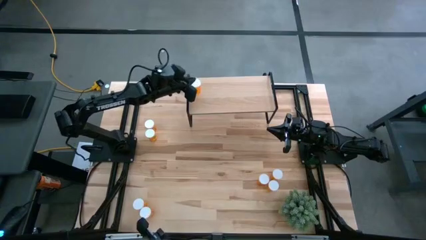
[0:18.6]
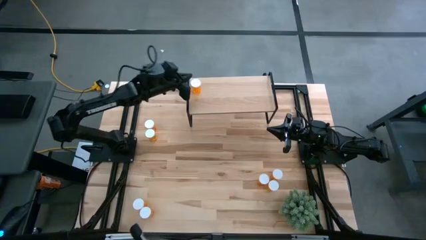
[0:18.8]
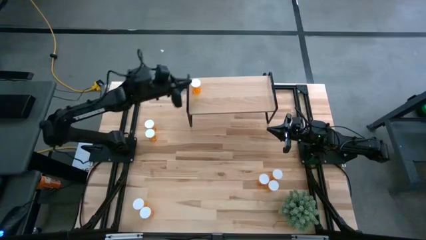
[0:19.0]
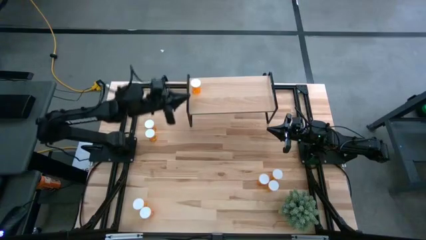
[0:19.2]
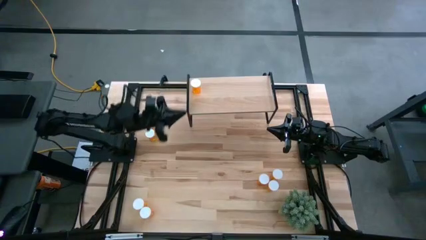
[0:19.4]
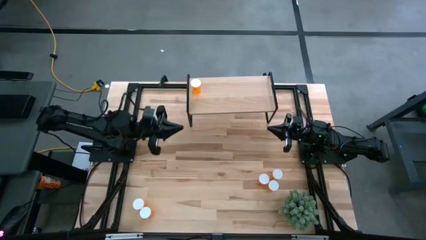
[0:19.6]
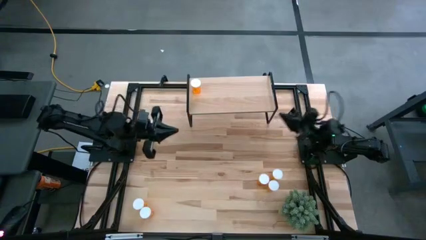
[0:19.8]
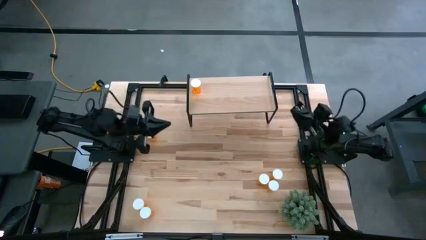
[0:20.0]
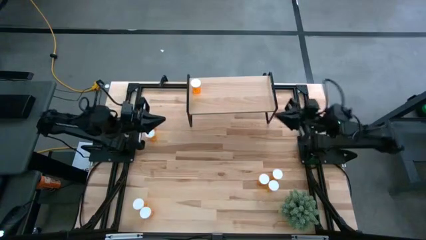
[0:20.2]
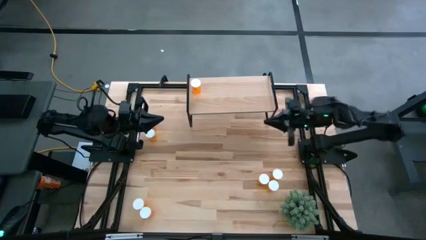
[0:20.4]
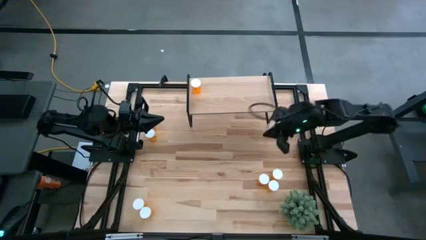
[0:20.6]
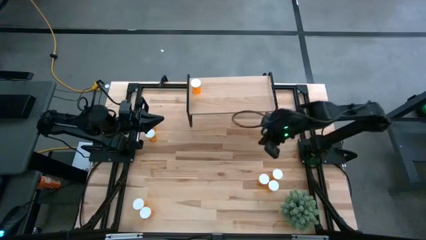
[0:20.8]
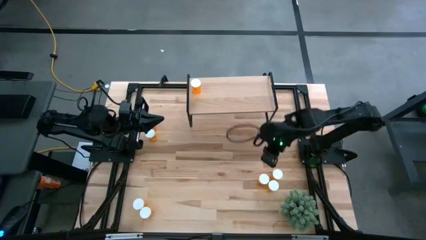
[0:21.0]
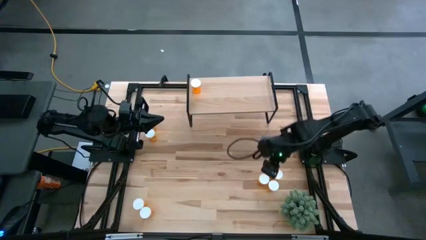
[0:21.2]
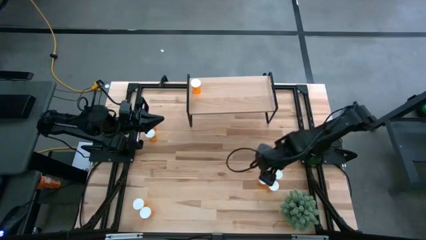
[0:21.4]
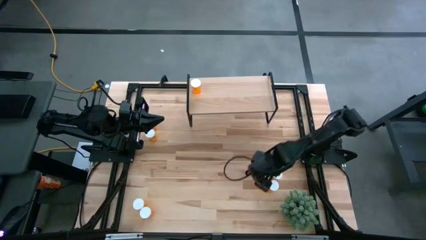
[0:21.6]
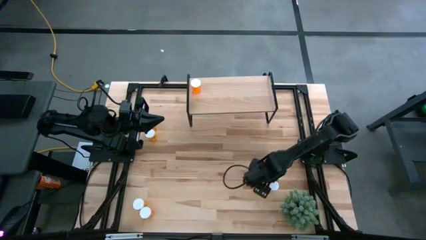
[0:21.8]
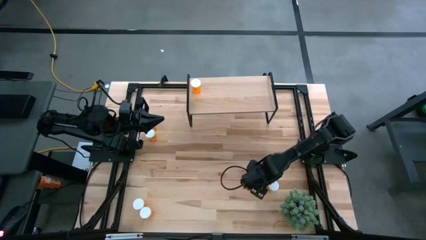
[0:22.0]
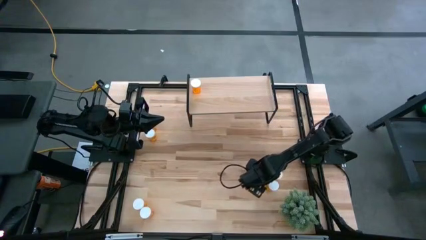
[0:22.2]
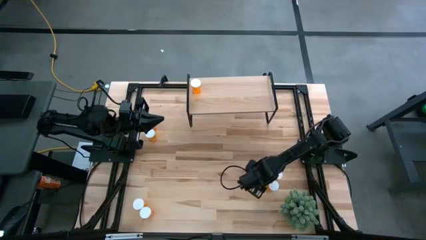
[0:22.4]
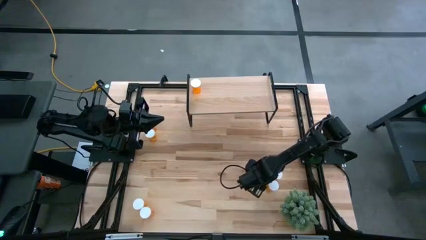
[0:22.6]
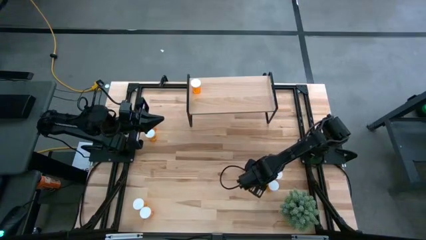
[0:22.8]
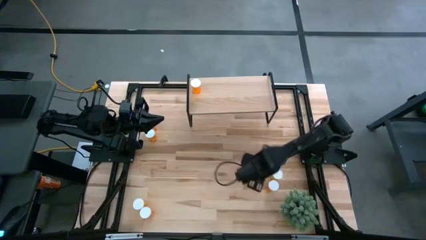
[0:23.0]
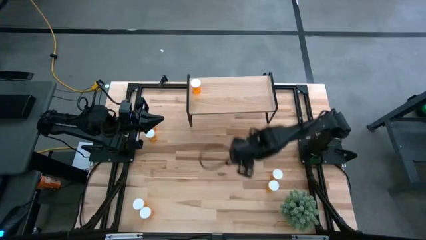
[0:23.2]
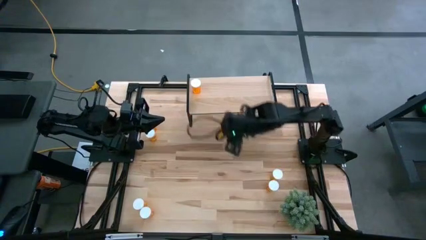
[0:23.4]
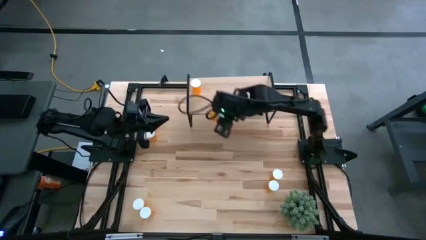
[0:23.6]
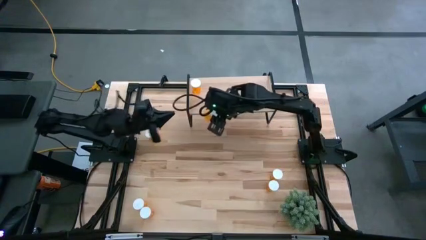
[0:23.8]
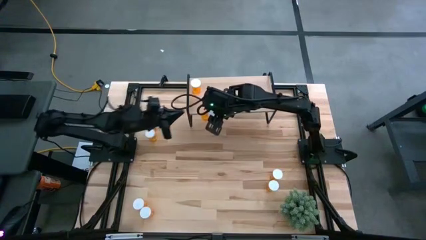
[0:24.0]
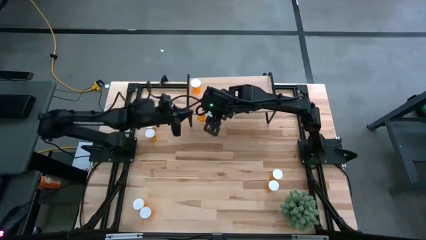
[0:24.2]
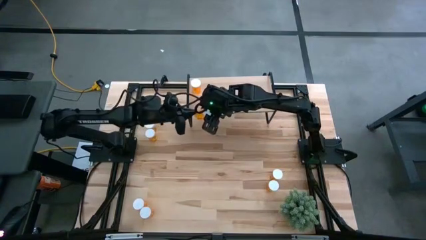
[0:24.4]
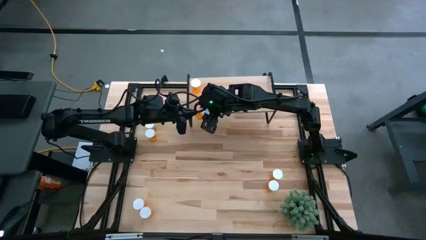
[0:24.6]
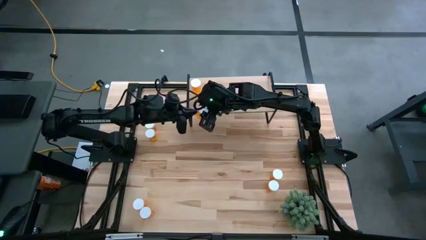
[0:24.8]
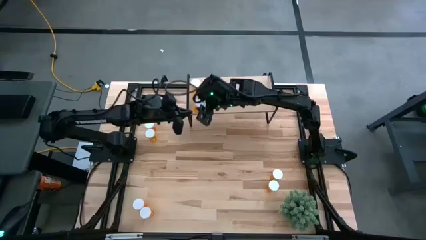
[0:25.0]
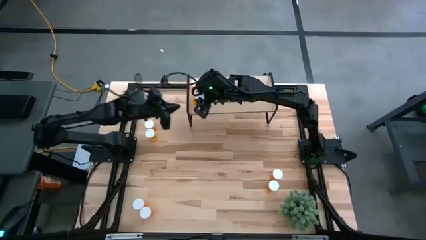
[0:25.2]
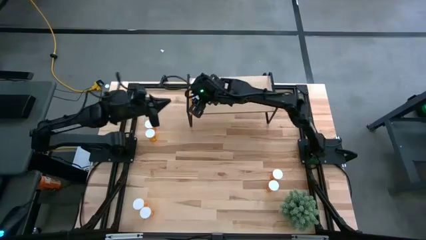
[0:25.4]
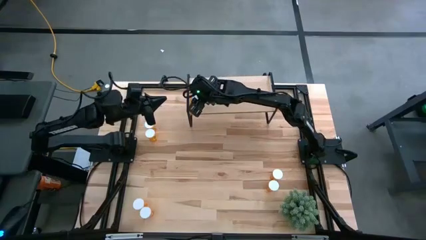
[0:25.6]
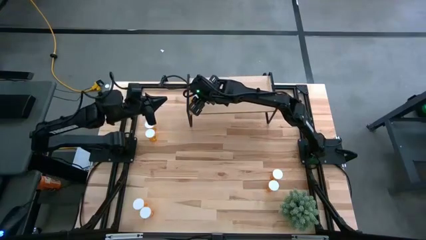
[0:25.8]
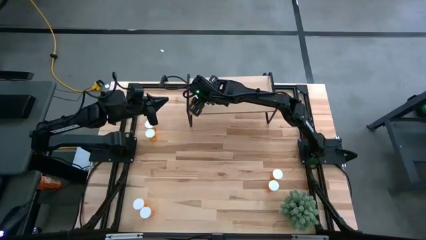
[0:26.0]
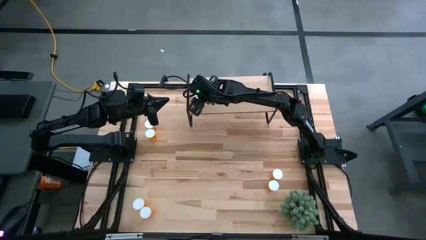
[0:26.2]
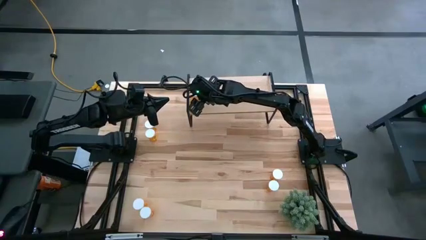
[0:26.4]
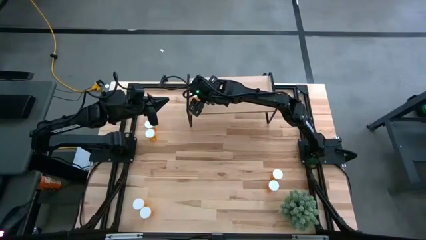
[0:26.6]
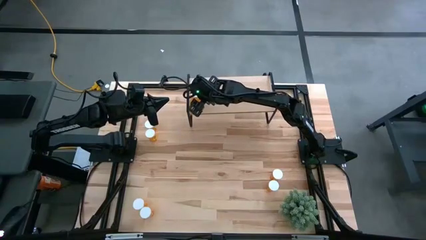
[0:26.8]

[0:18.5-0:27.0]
Task: Pick and place medicine bottles onto shelf by color
Put the orange pill bottle on the shelf aligned with the other orange pill bottle

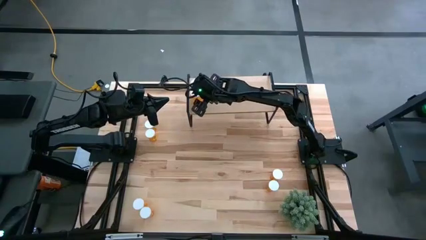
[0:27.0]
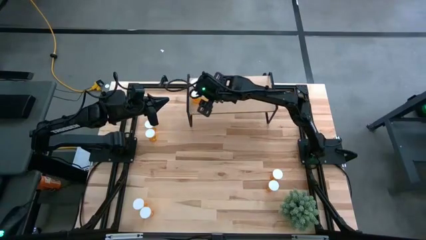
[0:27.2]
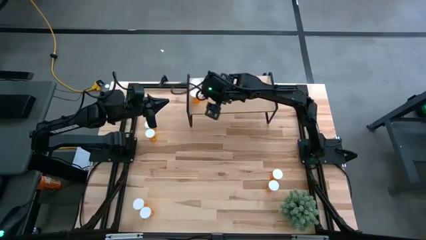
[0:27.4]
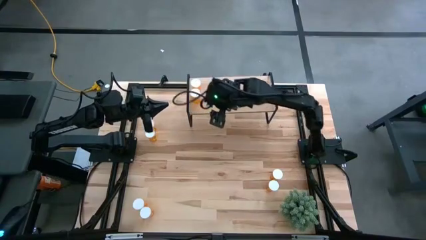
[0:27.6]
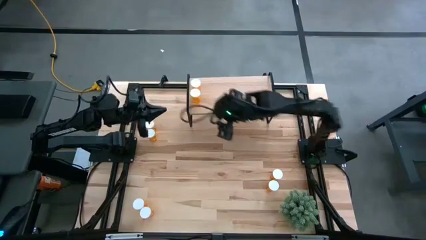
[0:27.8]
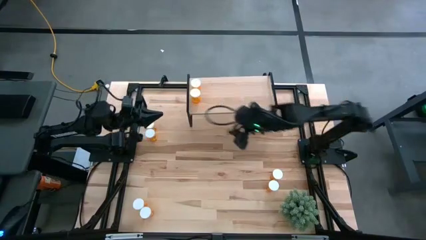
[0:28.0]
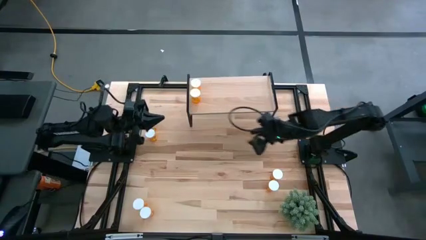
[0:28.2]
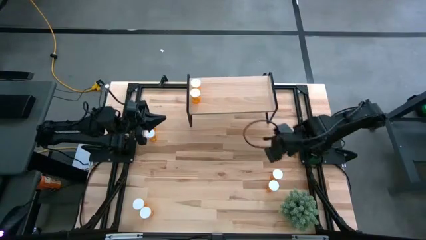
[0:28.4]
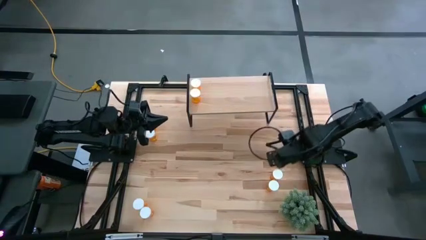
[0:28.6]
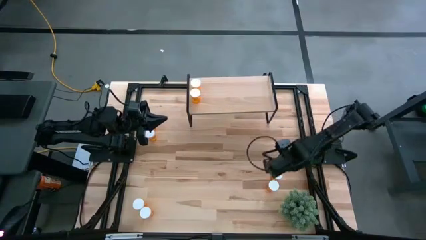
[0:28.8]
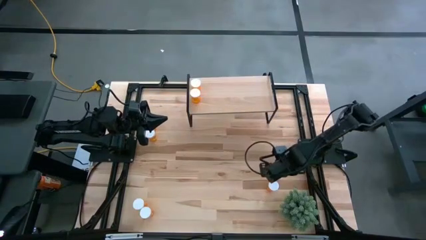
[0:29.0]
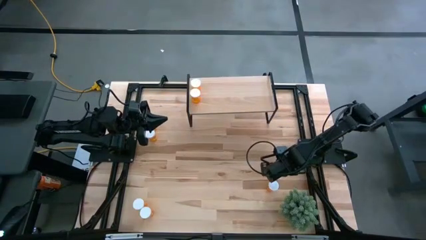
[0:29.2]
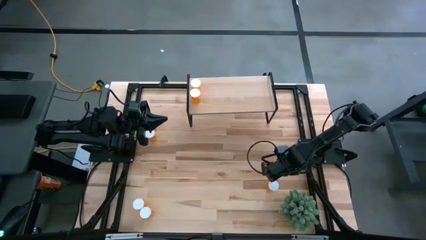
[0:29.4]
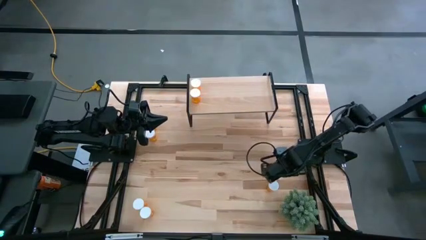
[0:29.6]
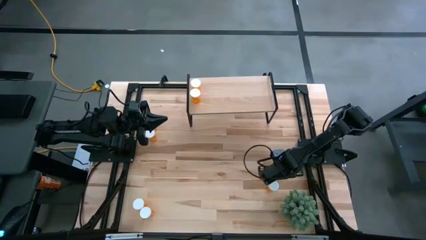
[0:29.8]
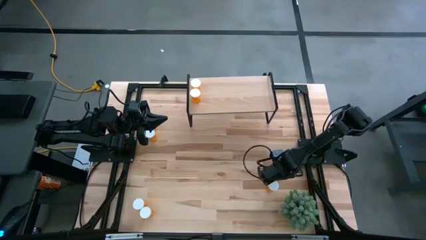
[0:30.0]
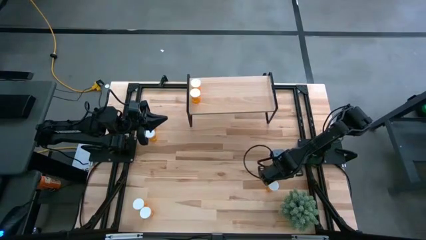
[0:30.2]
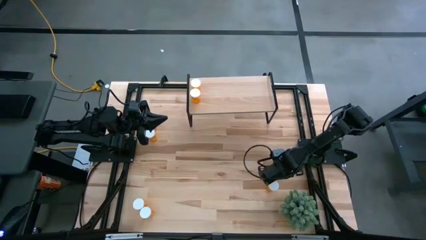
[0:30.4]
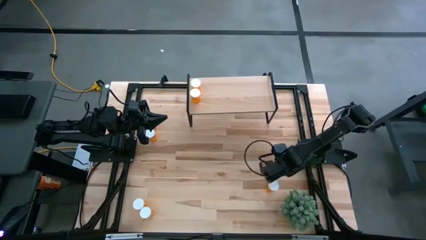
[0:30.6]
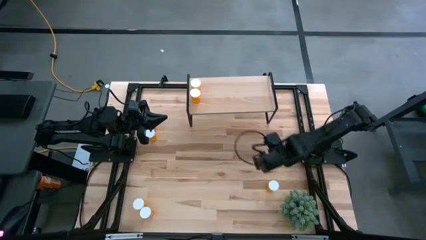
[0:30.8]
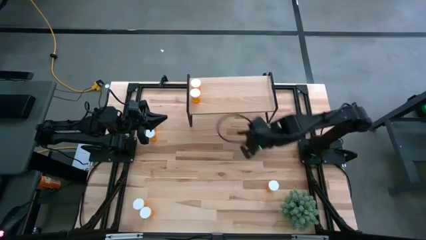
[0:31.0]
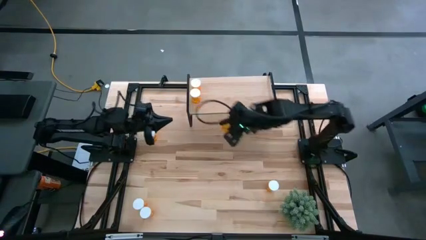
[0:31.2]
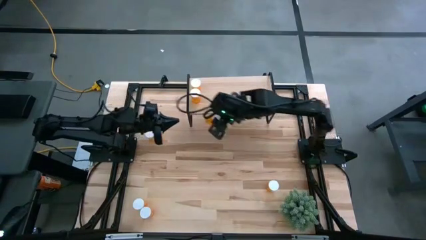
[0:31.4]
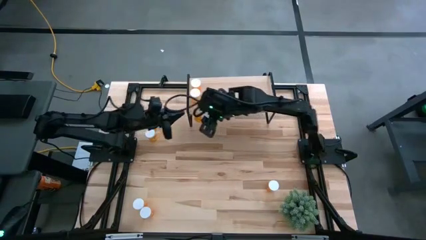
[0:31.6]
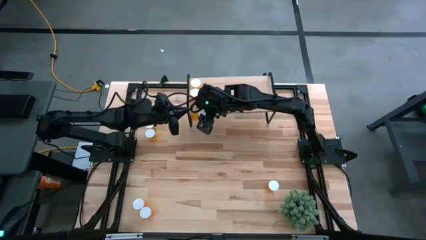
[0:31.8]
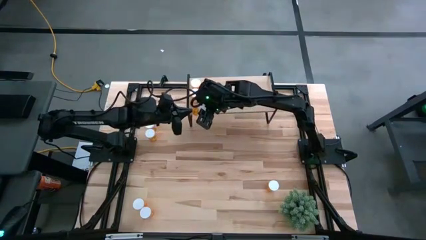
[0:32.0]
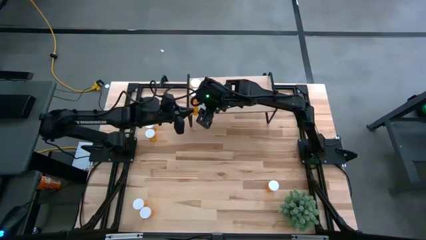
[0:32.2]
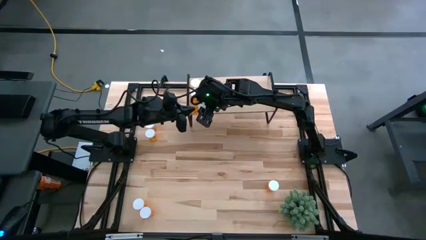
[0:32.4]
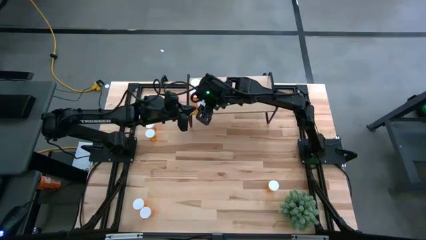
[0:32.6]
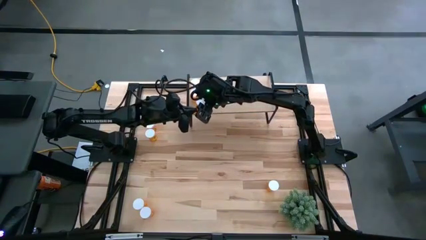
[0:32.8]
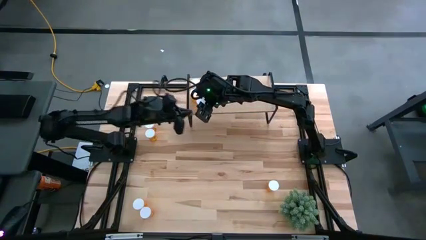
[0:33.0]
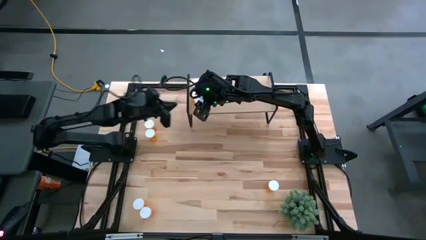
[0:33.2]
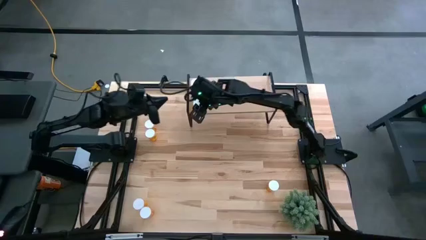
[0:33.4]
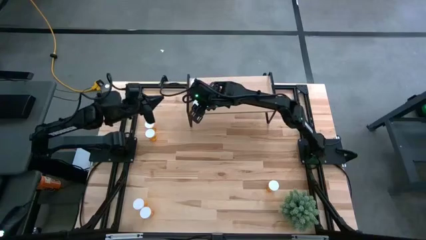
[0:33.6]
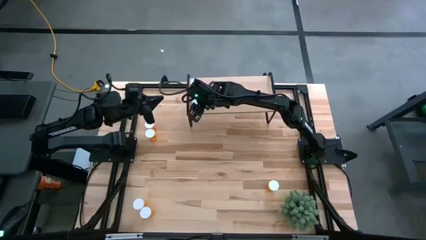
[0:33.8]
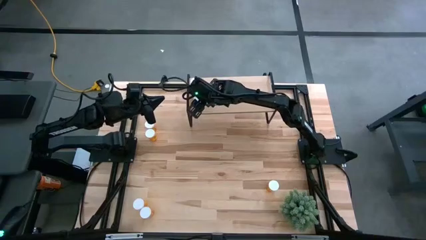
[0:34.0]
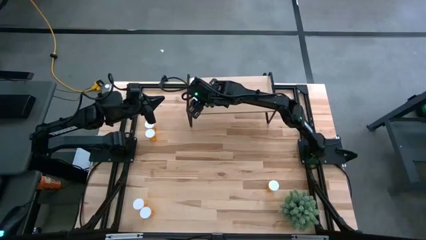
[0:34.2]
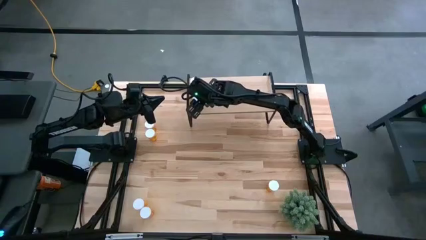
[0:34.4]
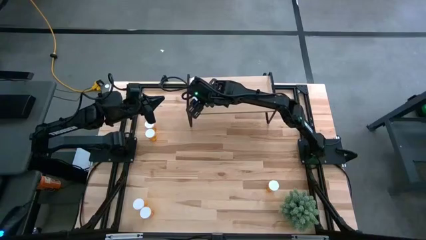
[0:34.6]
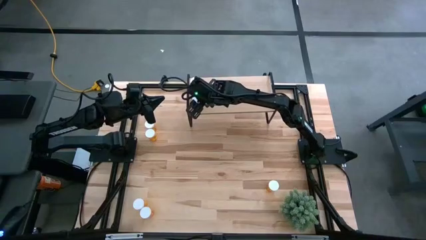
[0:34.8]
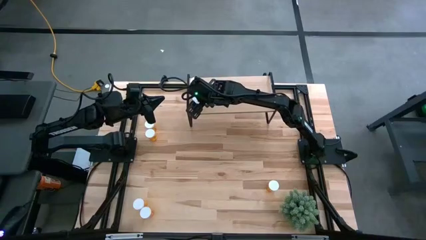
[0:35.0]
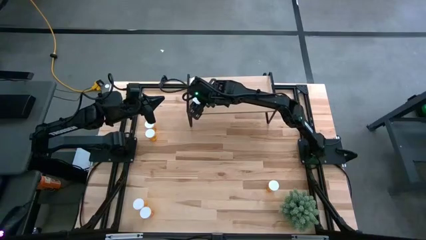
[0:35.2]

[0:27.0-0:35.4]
Put the orange pill bottle on the shelf aligned with the other orange pill bottles
